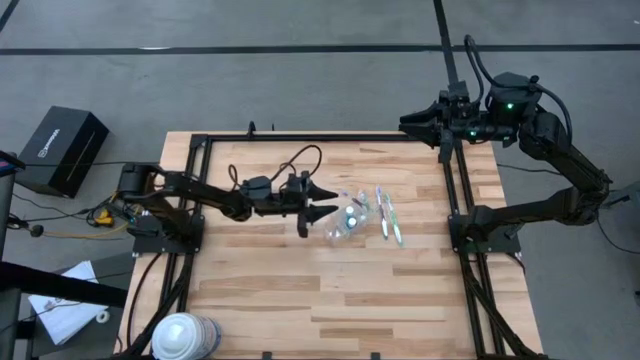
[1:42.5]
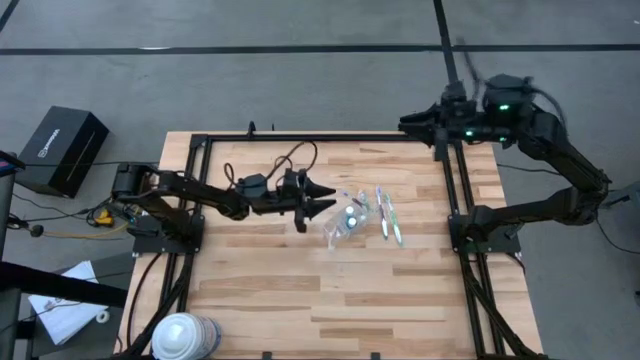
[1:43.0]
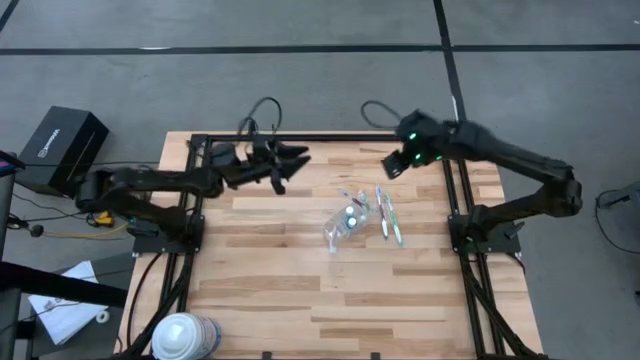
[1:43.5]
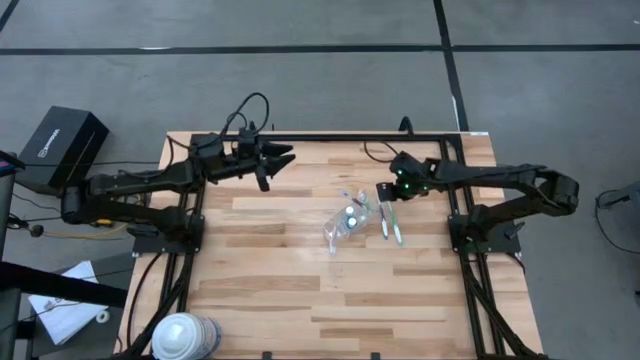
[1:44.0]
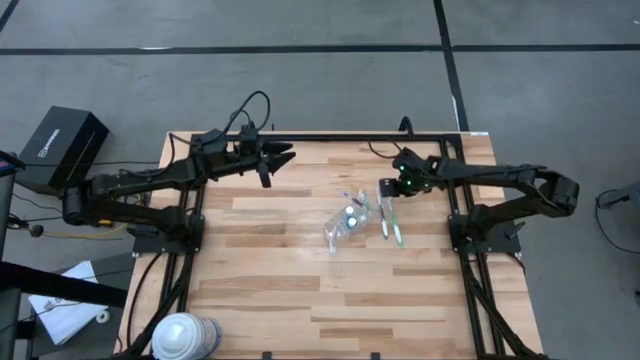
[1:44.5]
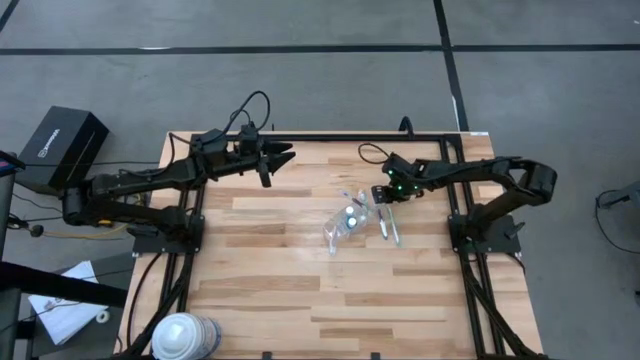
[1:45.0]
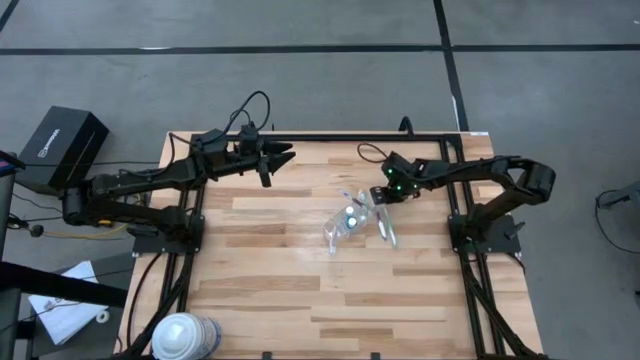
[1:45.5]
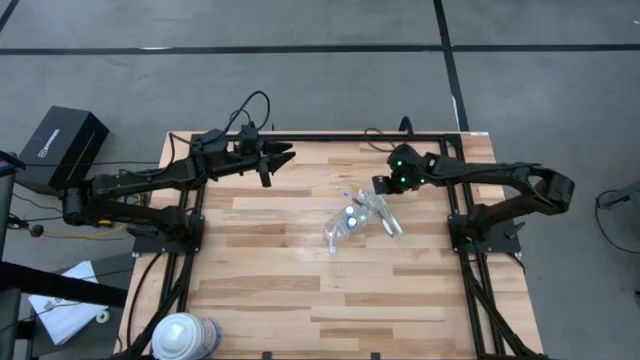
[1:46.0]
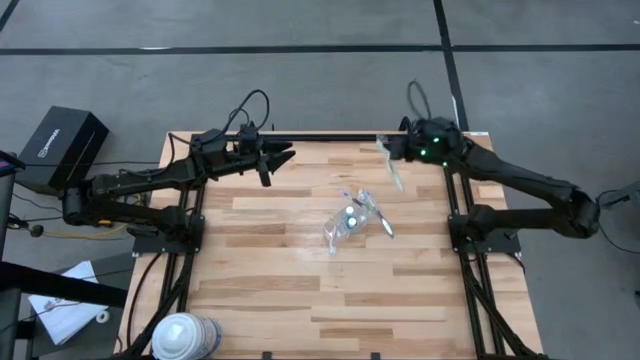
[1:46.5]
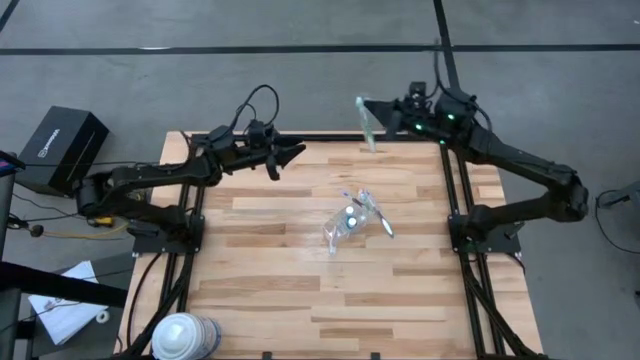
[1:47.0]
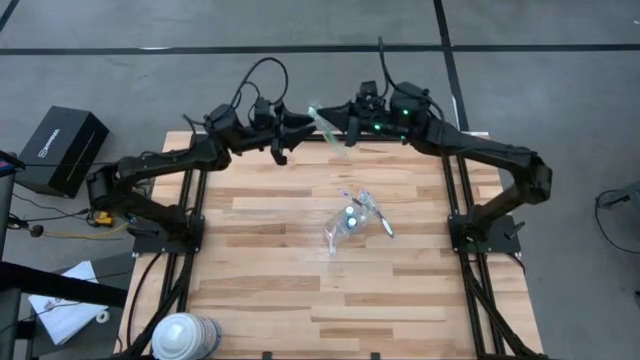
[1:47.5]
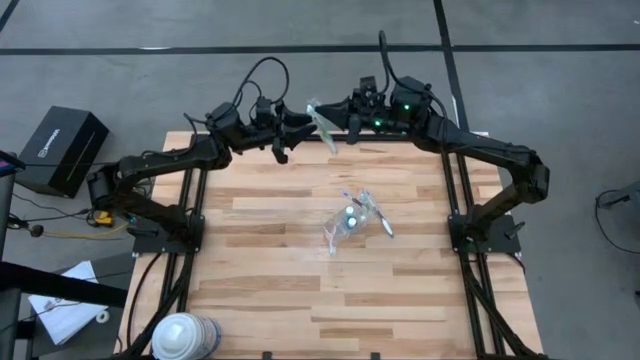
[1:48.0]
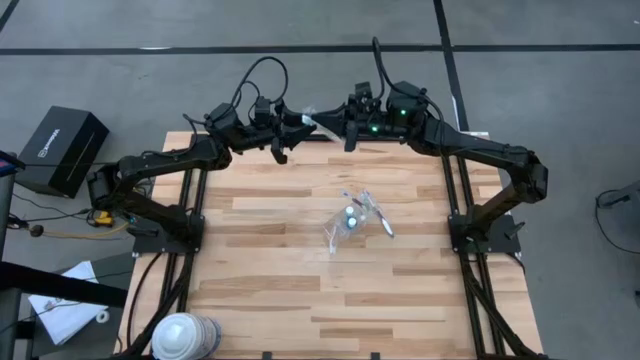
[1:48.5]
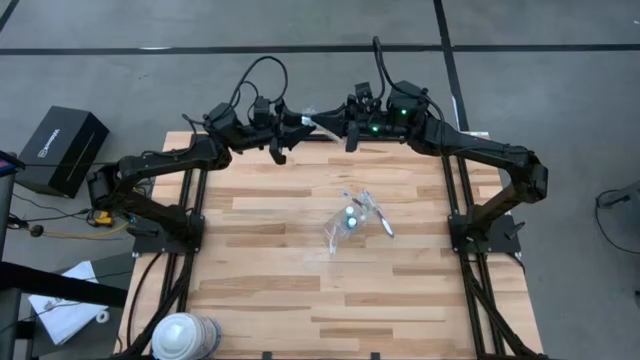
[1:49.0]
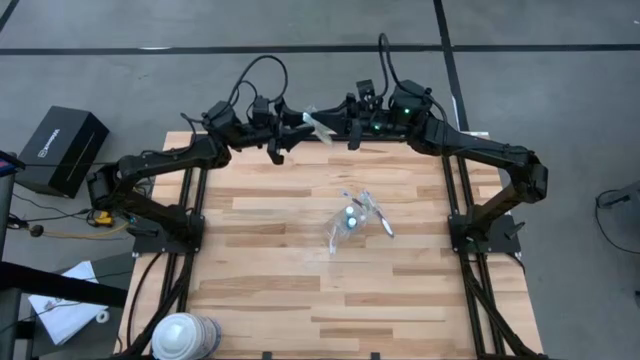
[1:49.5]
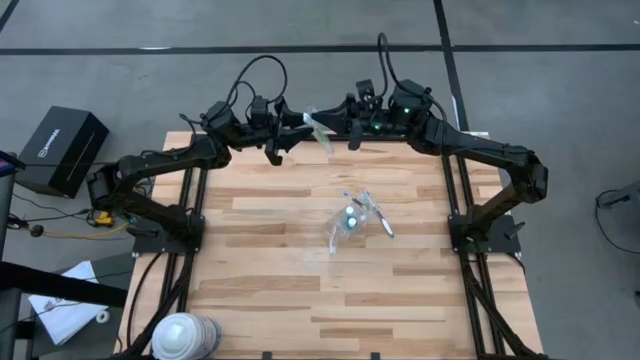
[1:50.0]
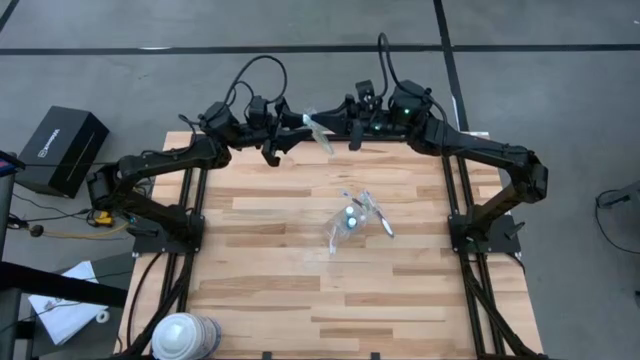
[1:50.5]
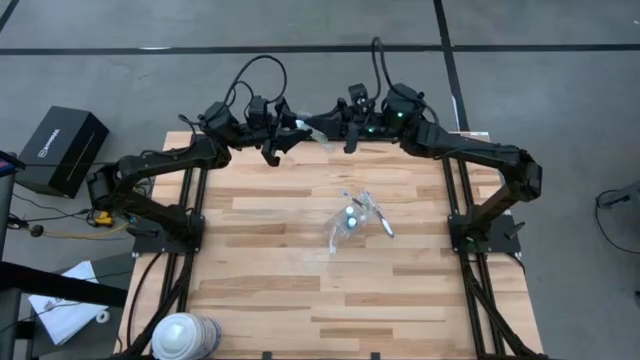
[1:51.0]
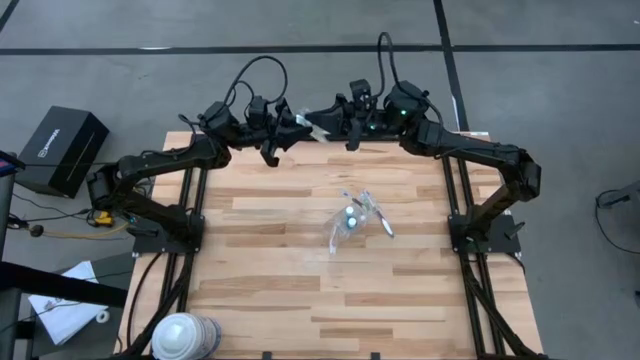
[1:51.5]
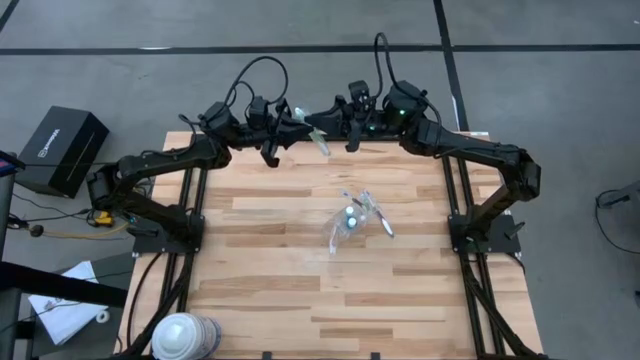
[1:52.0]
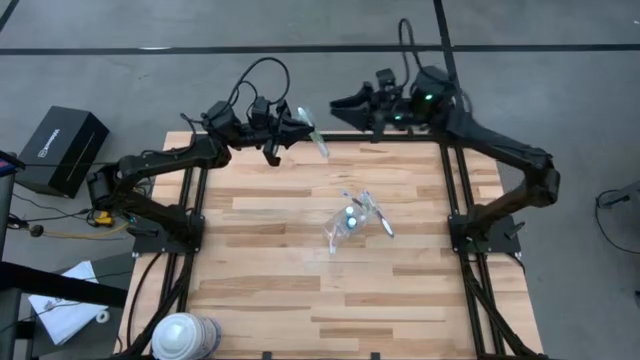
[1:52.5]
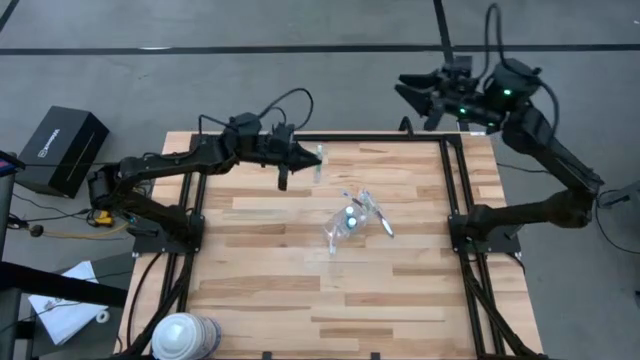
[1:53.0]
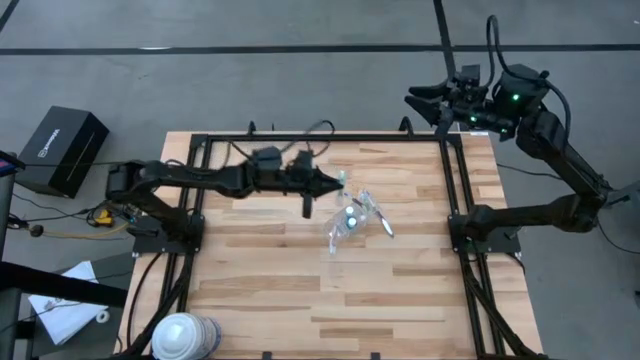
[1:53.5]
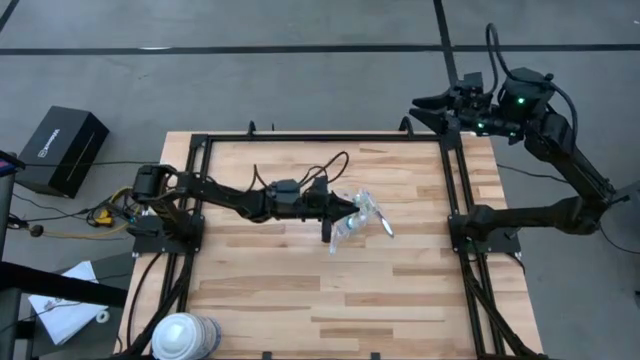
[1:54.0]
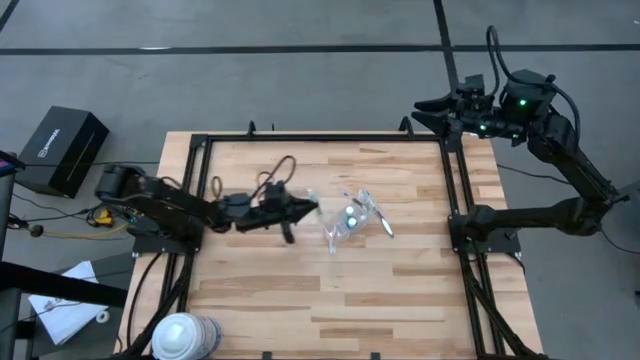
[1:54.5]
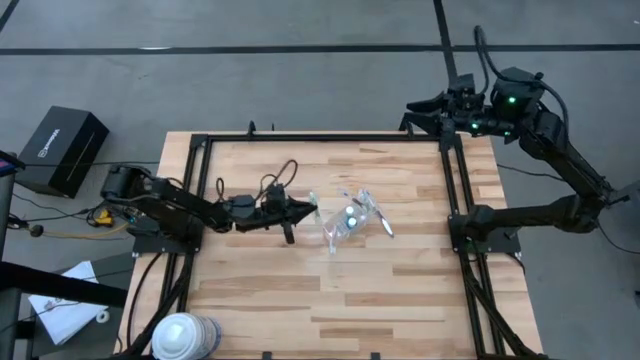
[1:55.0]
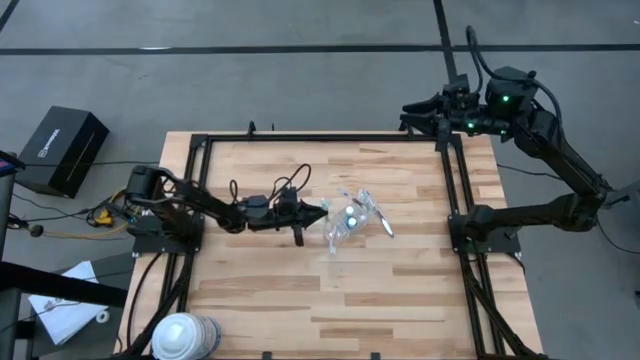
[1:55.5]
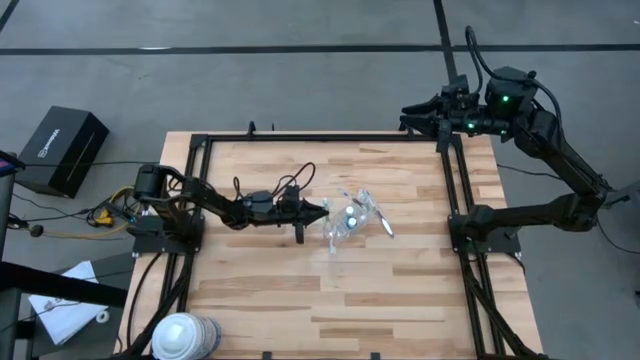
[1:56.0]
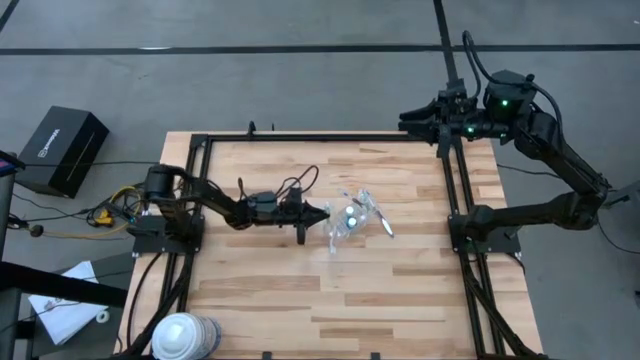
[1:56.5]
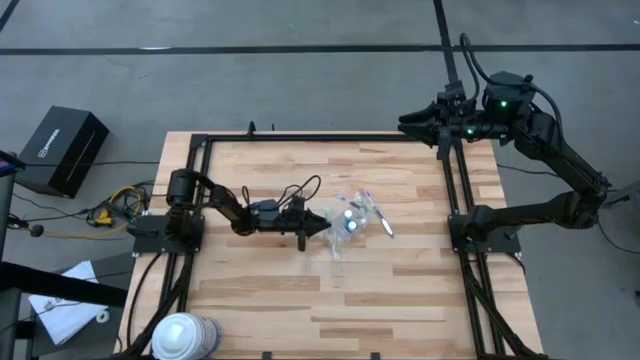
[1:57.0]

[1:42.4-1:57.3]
Task: Pick & Place toothbrushing station
Put the green toothbrush into the transparent organizer

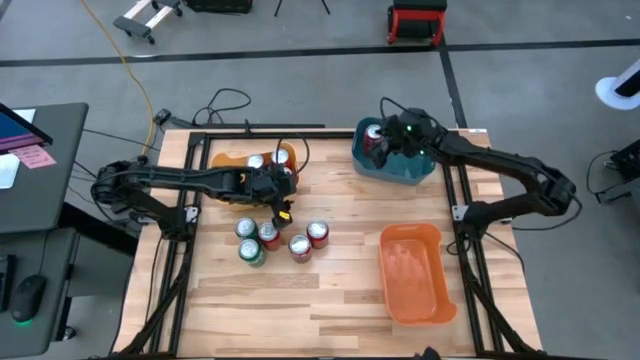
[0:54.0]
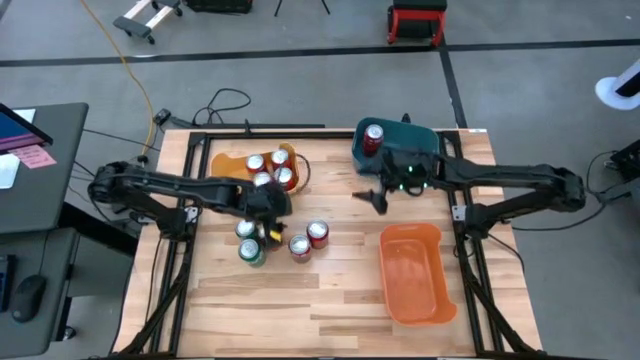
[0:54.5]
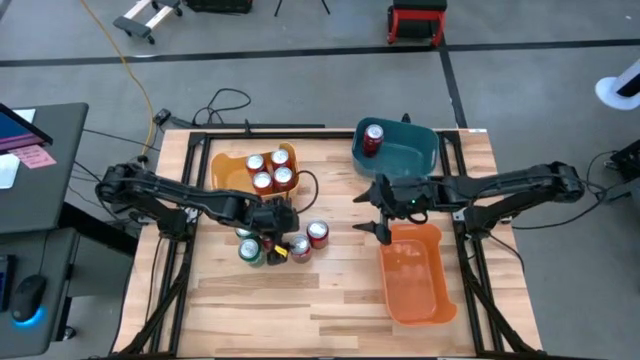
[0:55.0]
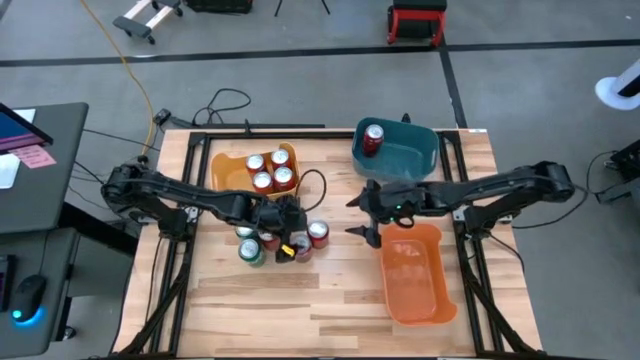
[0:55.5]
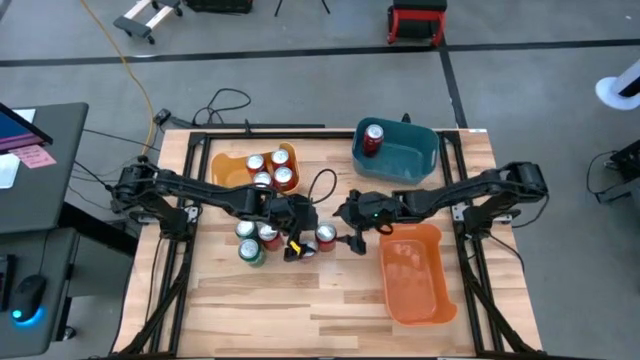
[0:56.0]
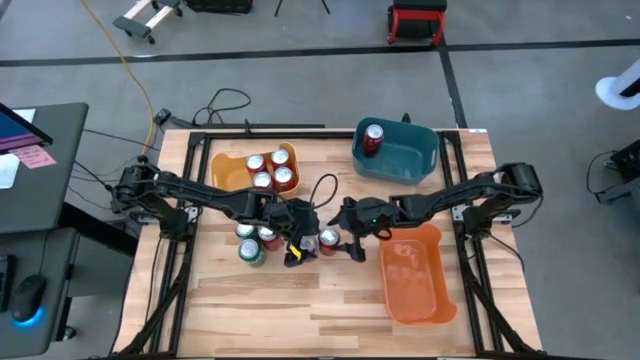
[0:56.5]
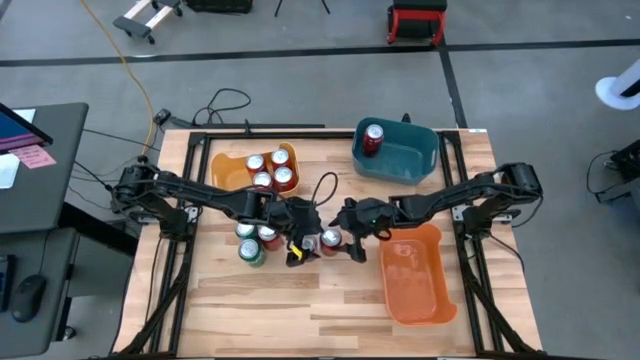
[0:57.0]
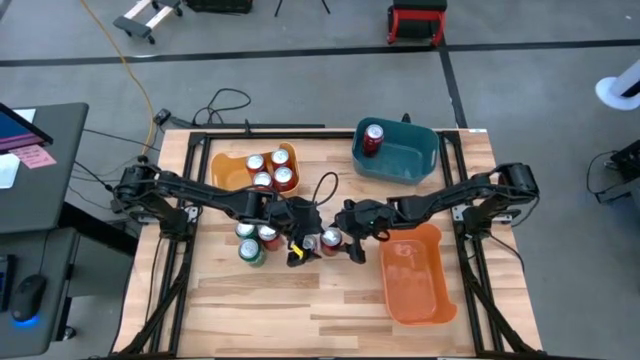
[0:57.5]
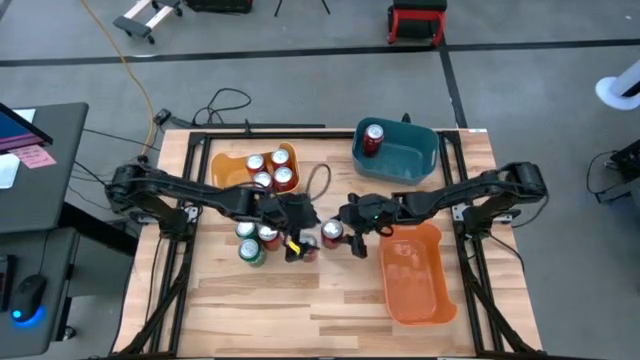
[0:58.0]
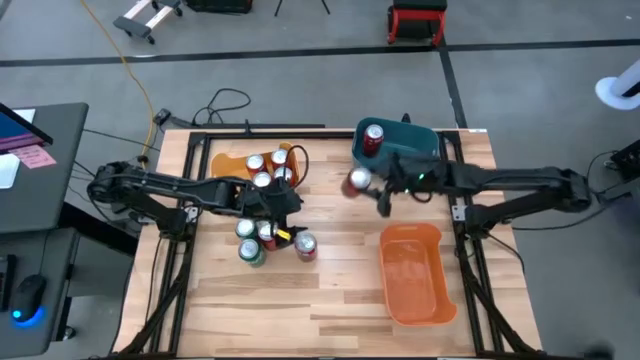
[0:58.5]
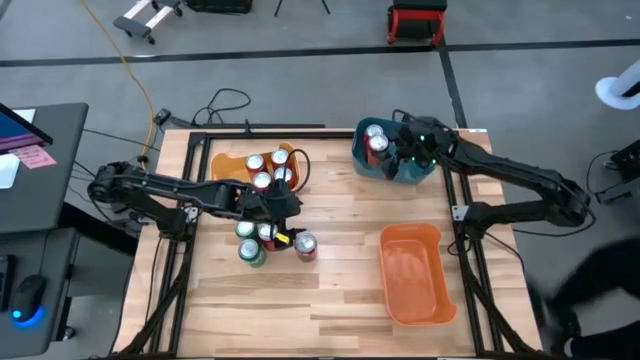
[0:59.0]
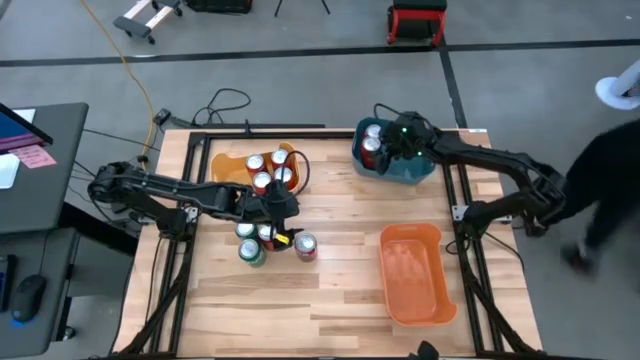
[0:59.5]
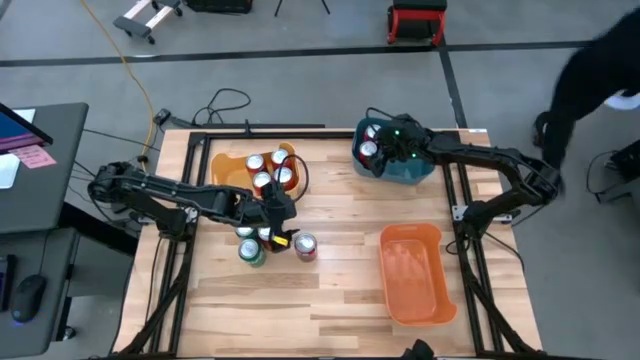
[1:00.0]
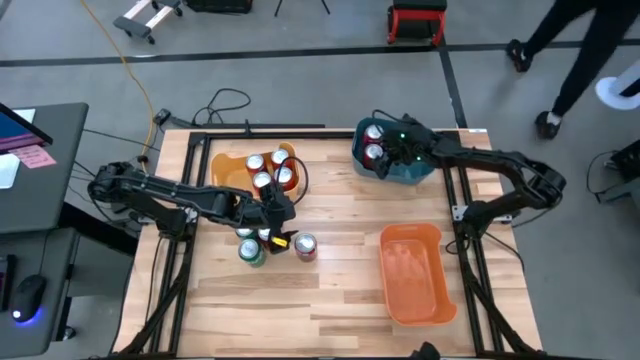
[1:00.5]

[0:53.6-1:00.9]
Task: Sort soda cans
Put the right red soda can into the blue bin
